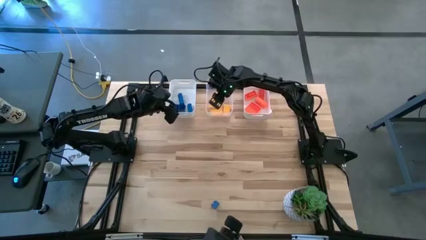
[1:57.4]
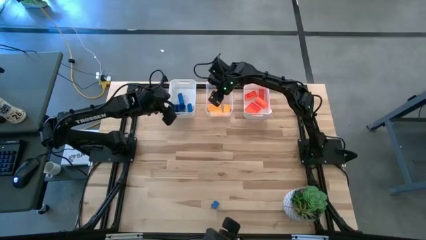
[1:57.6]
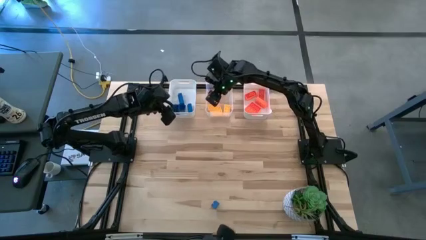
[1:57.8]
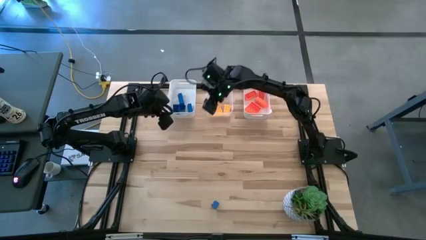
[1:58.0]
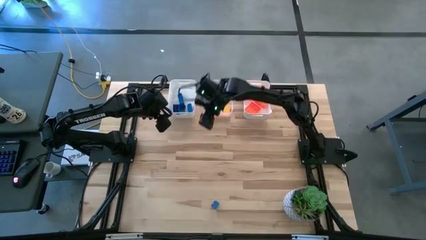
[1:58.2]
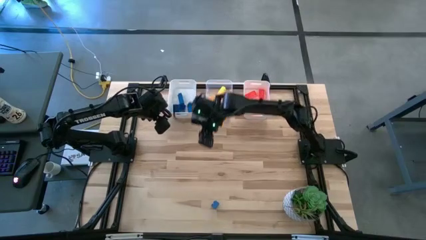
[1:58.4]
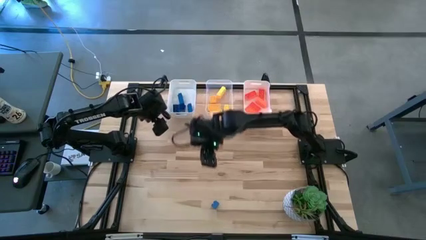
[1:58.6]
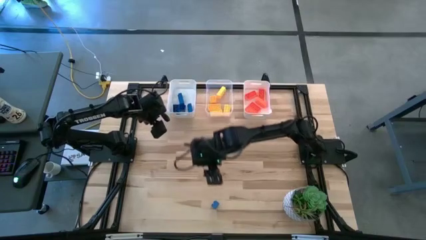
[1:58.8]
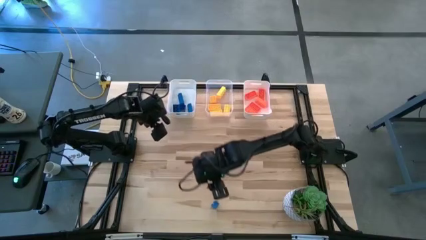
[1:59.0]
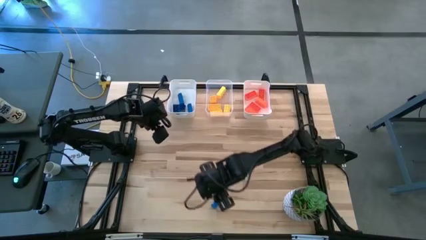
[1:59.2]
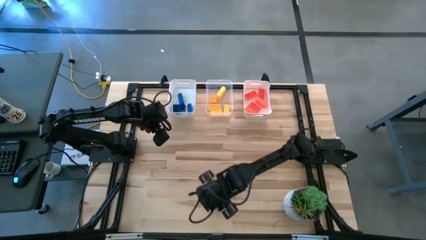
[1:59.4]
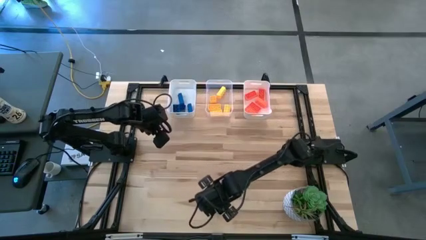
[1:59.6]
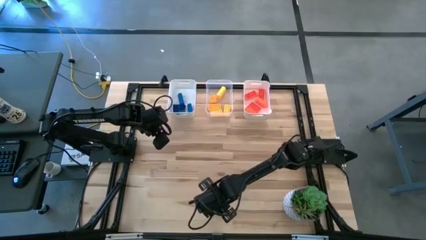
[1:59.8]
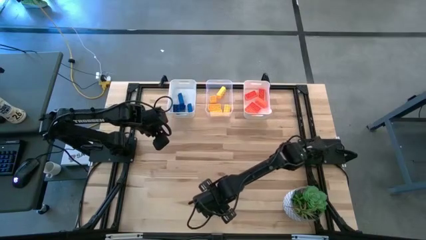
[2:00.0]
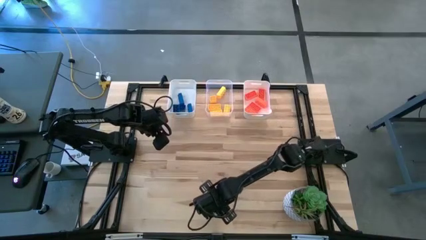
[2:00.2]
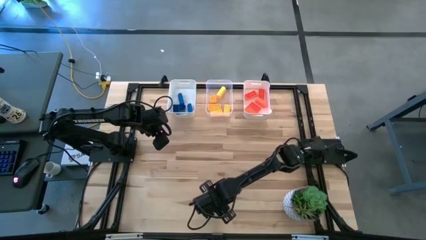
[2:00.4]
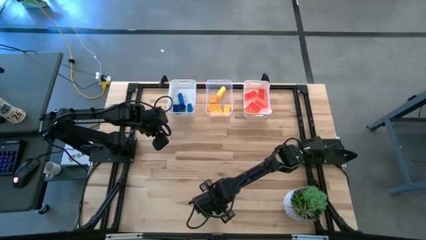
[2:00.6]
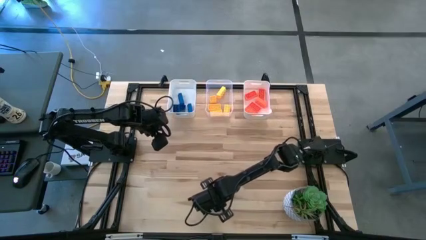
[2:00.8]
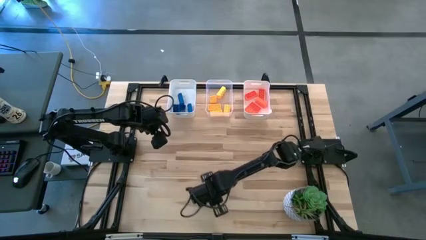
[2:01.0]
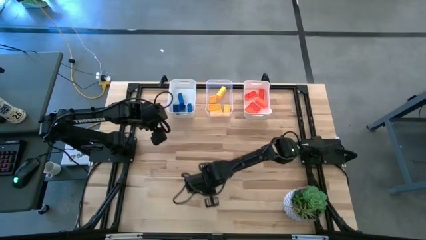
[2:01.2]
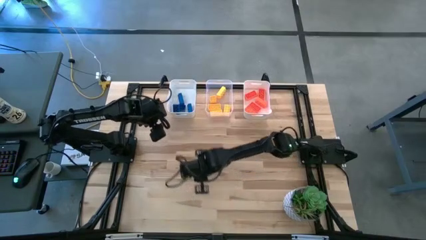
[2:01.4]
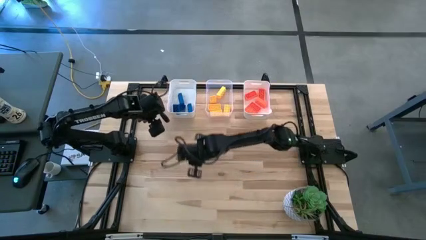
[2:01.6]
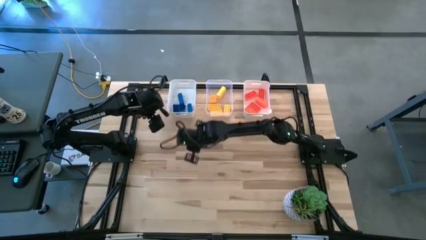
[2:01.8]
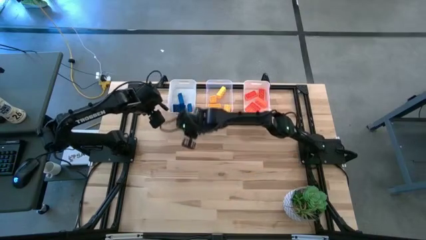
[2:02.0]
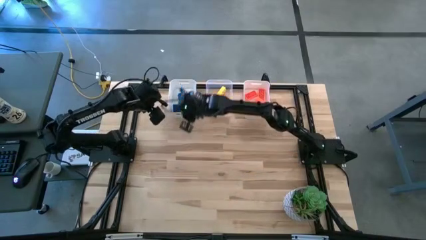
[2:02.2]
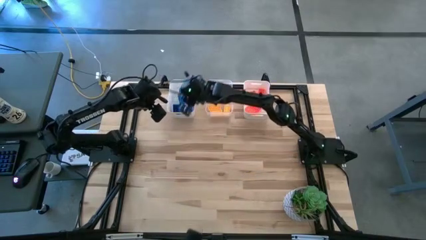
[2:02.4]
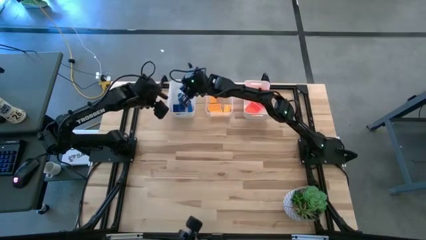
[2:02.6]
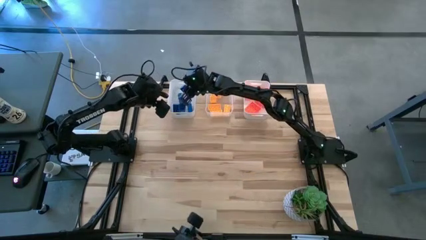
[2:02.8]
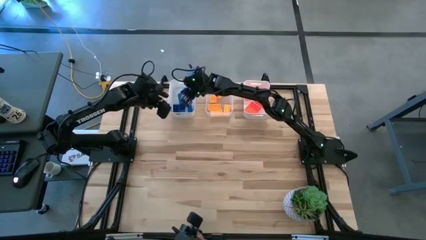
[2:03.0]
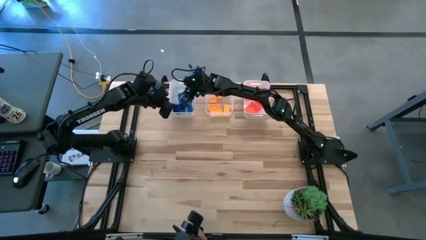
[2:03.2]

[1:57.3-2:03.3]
Task: Sort & place blocks by color
Put the blue game piece into the left white bin

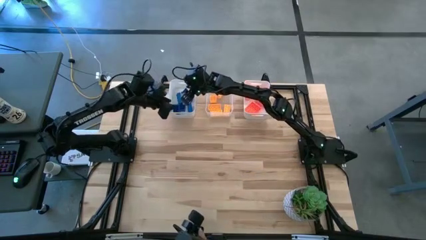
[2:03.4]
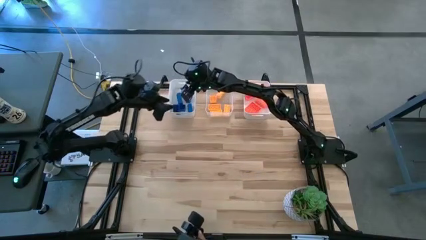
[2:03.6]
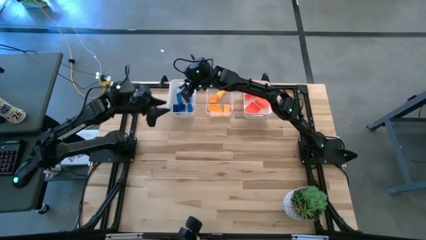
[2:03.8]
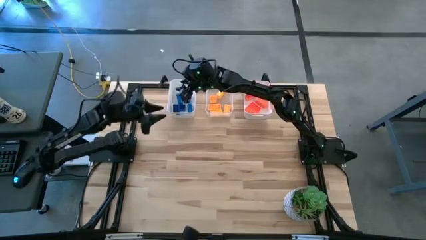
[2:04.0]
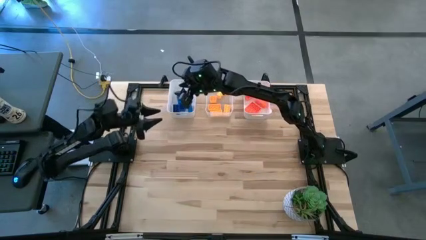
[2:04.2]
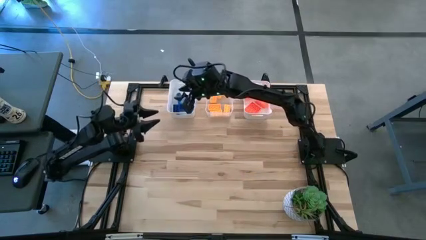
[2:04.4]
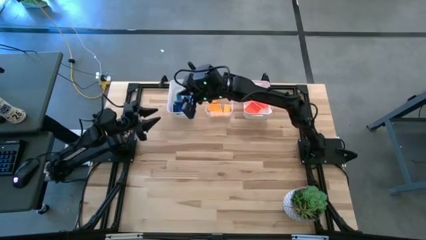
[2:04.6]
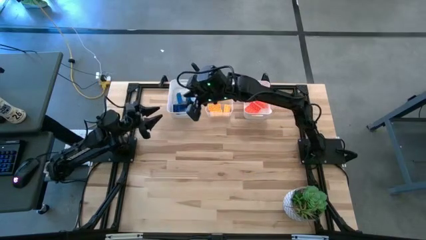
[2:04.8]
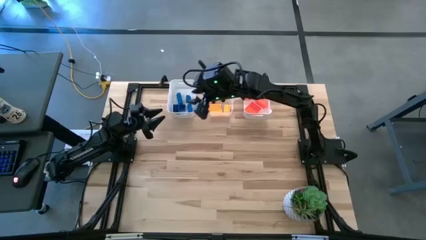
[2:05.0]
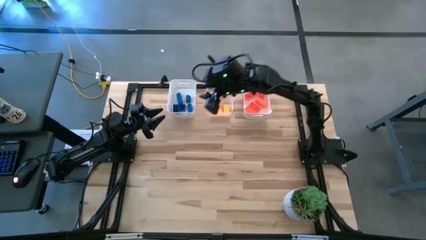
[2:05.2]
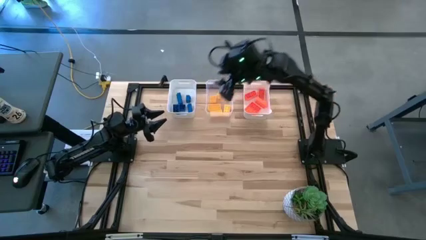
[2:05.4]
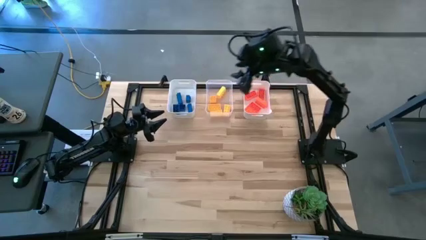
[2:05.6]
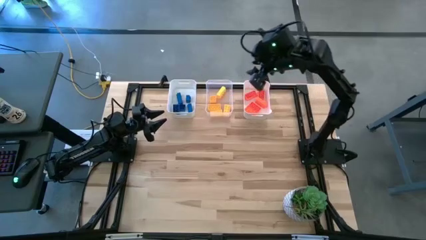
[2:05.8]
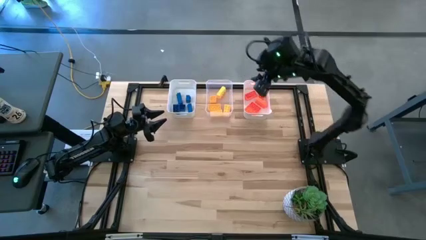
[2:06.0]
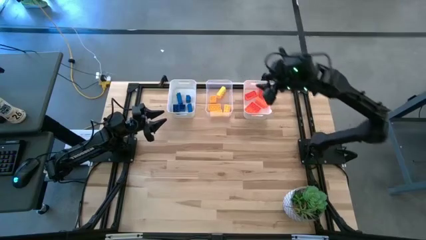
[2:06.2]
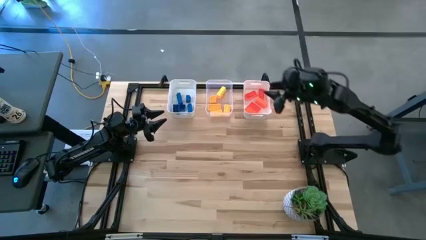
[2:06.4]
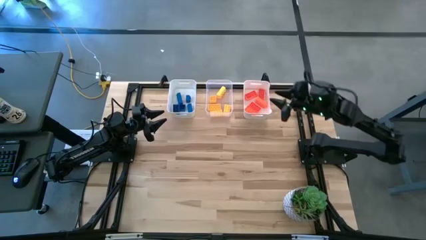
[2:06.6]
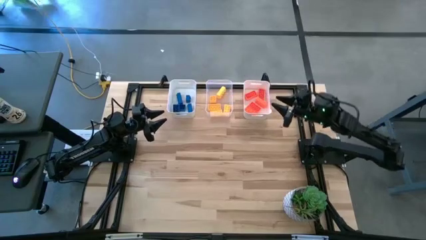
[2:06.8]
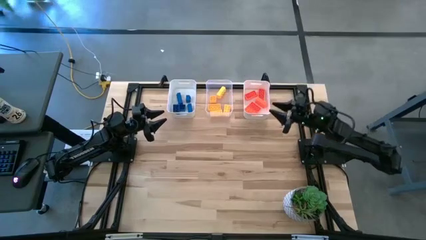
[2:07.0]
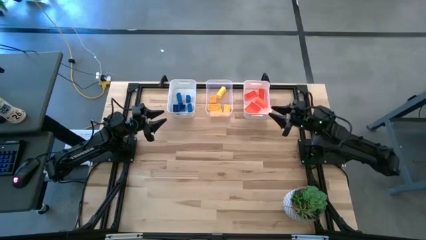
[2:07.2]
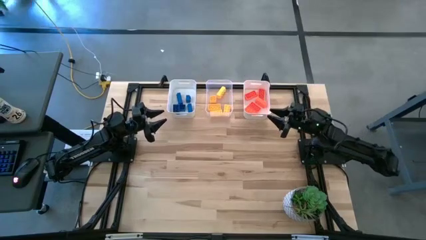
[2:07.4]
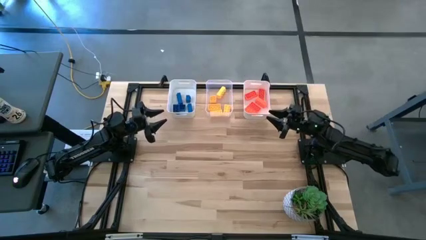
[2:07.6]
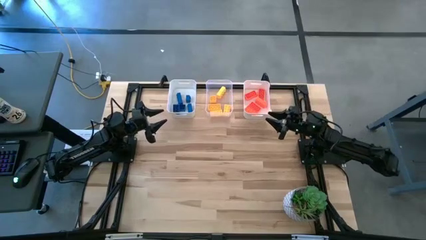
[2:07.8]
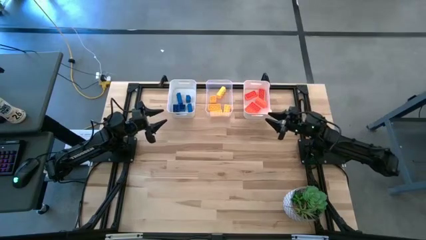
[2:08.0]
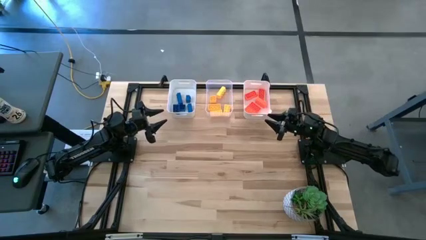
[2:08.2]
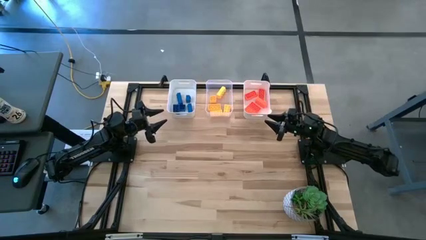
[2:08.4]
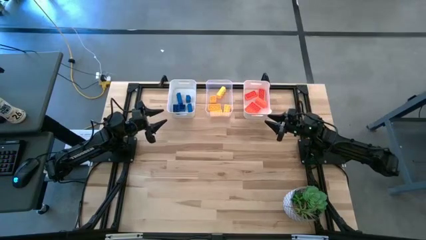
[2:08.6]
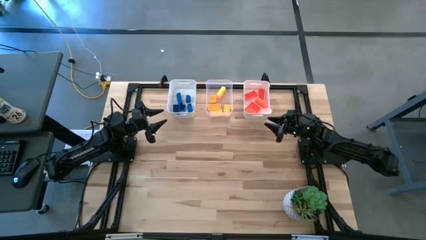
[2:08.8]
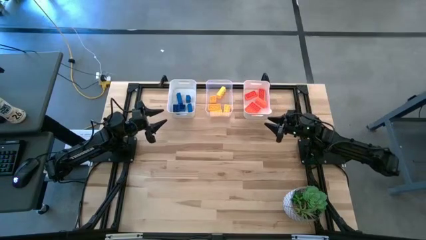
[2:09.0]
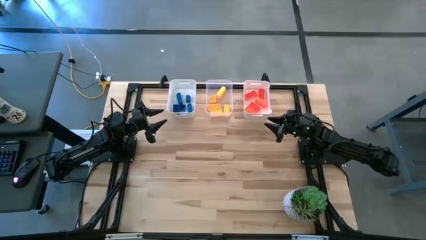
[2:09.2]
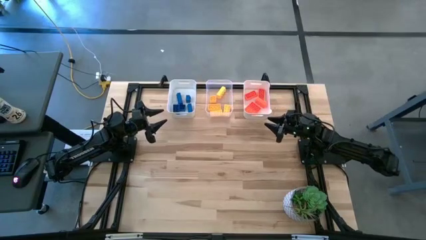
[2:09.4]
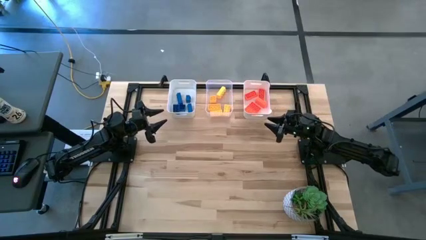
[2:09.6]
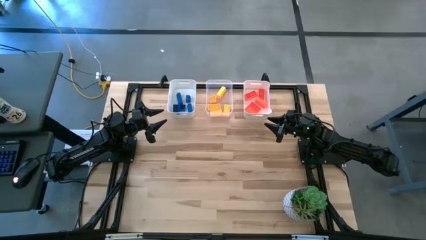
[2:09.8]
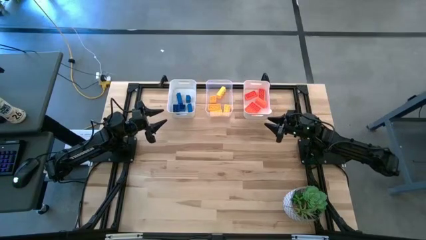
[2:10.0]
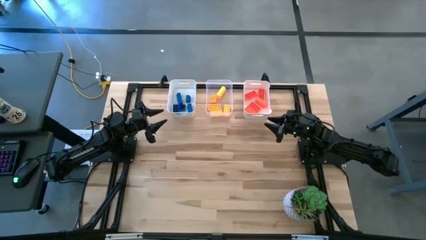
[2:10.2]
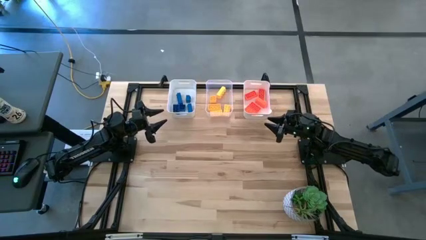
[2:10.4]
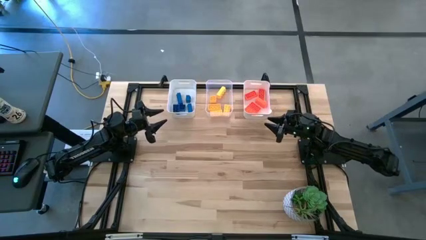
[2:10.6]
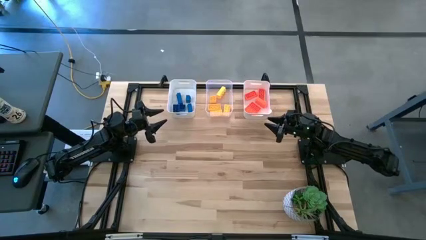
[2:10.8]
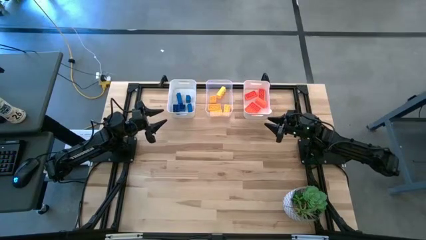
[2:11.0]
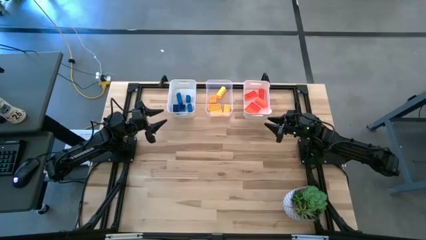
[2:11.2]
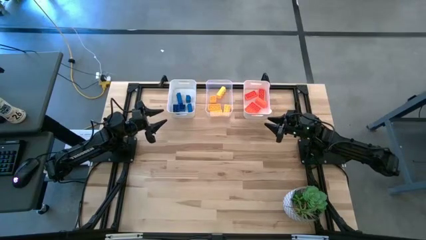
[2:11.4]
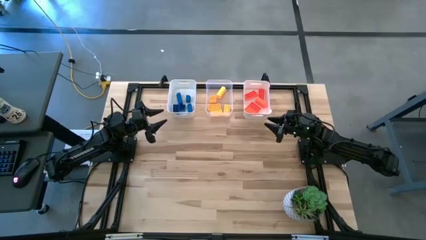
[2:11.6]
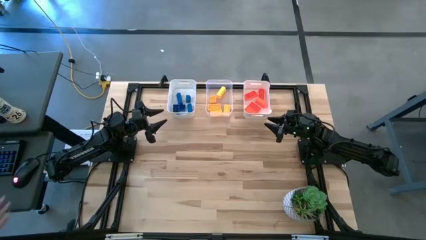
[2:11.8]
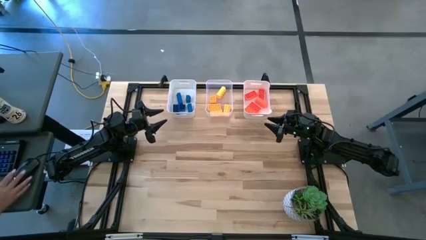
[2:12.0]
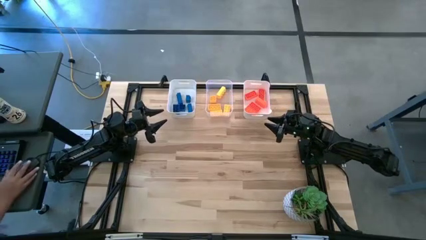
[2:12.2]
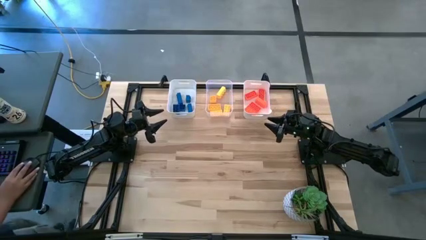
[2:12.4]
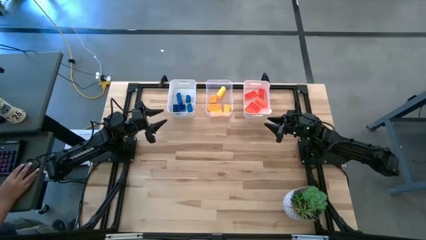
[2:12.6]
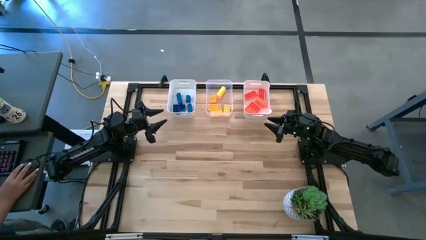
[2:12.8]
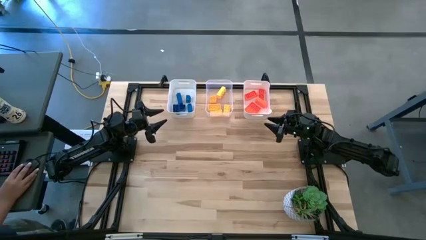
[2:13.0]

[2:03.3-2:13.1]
Return to Home Position
